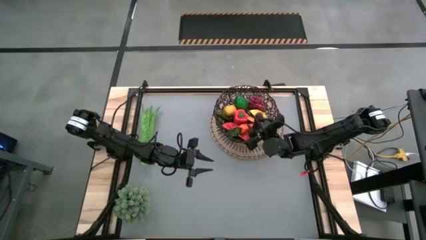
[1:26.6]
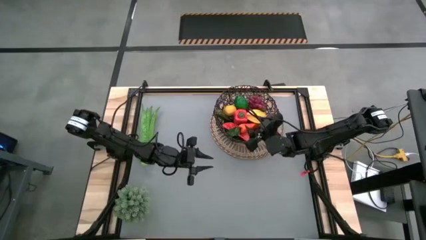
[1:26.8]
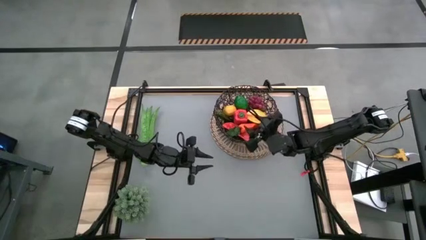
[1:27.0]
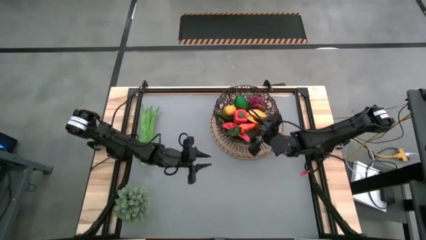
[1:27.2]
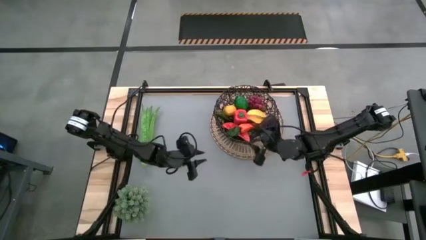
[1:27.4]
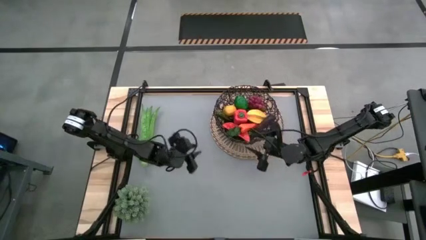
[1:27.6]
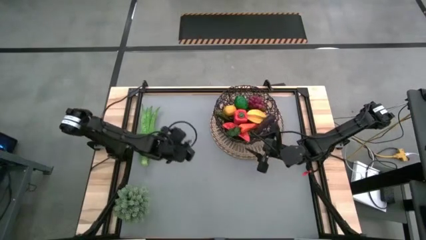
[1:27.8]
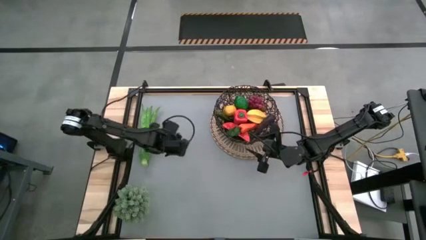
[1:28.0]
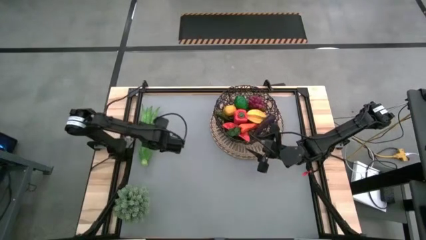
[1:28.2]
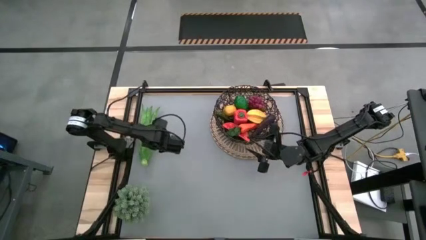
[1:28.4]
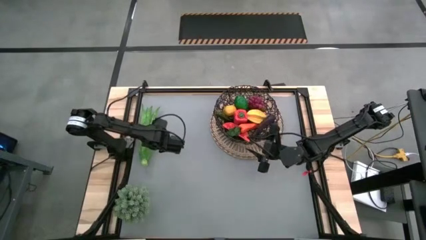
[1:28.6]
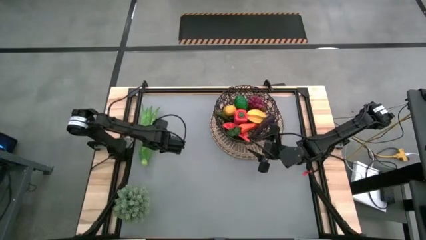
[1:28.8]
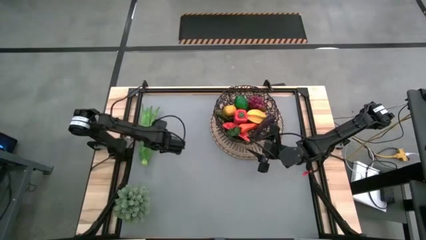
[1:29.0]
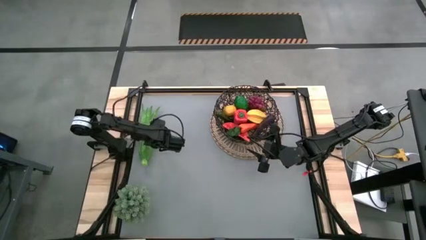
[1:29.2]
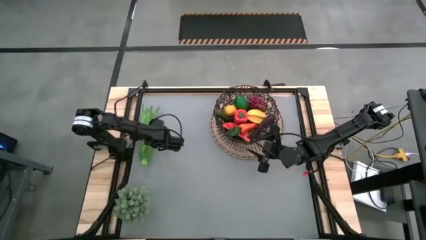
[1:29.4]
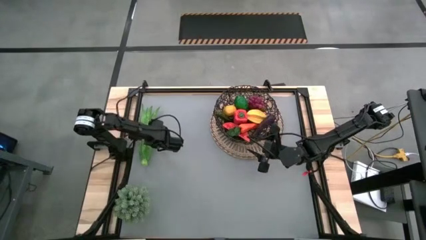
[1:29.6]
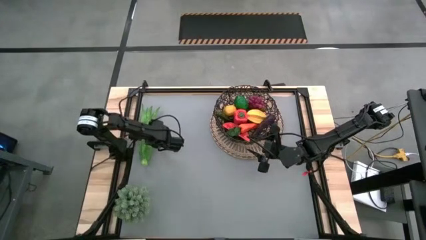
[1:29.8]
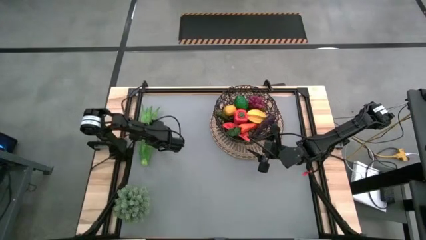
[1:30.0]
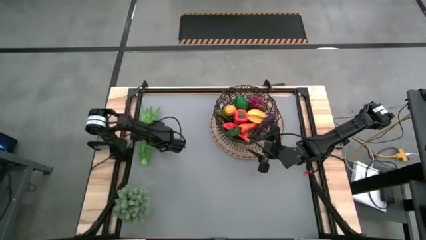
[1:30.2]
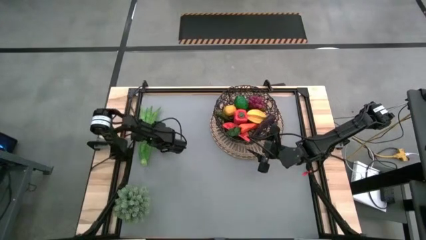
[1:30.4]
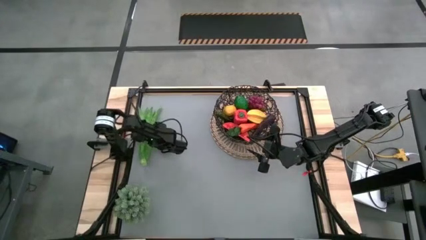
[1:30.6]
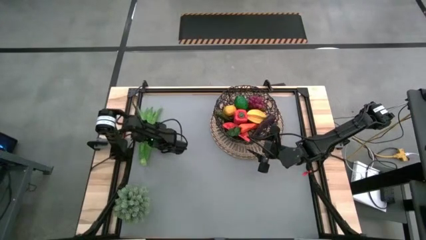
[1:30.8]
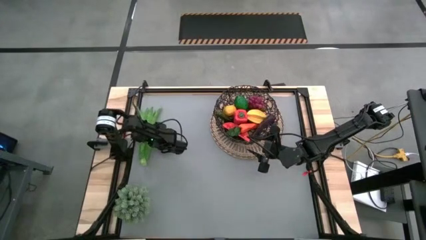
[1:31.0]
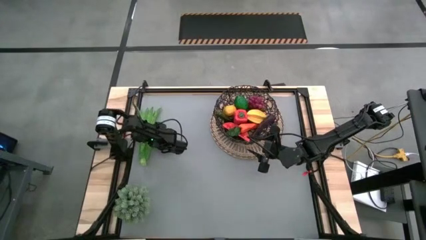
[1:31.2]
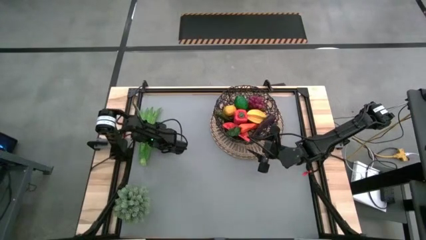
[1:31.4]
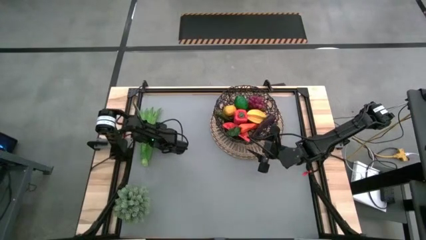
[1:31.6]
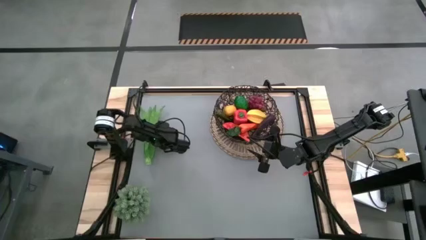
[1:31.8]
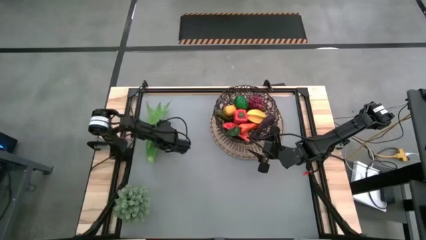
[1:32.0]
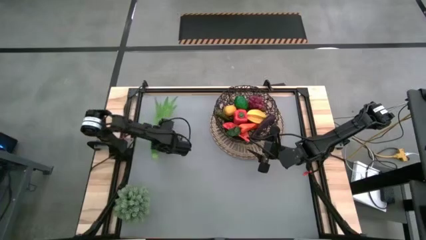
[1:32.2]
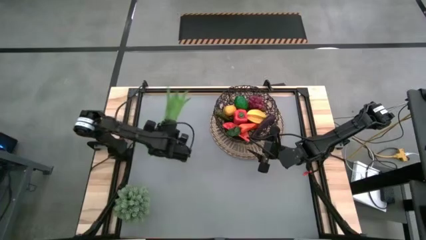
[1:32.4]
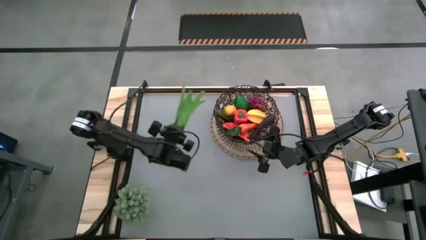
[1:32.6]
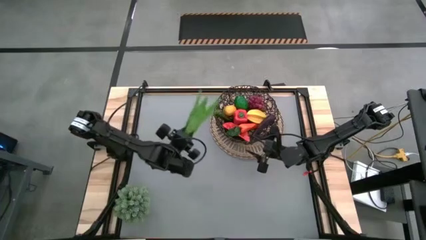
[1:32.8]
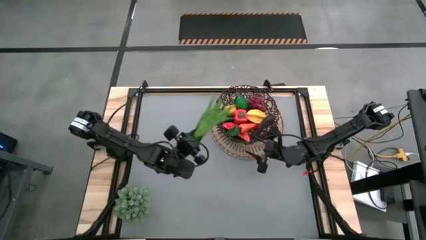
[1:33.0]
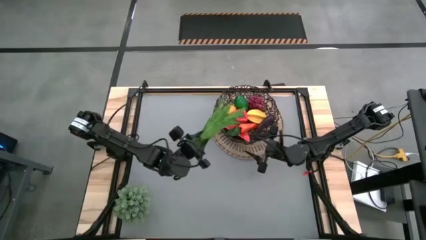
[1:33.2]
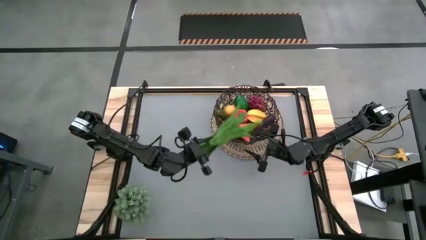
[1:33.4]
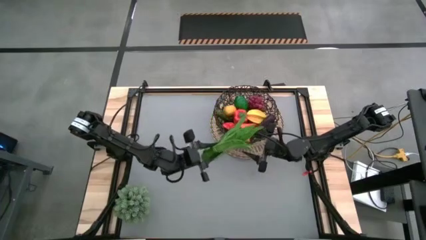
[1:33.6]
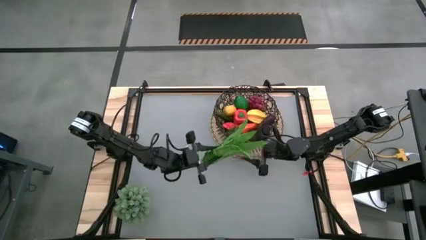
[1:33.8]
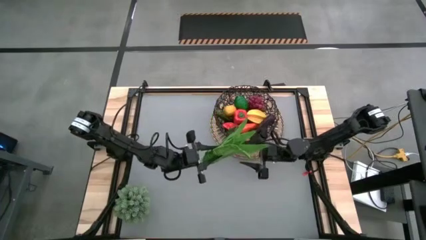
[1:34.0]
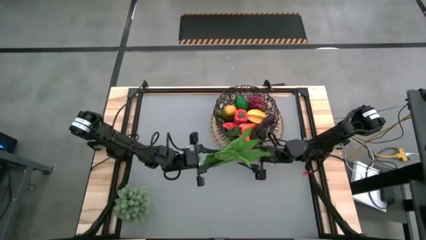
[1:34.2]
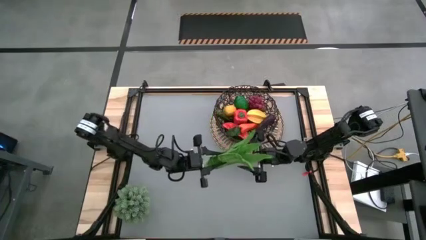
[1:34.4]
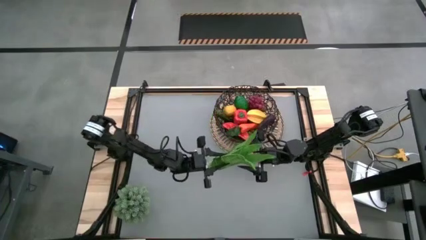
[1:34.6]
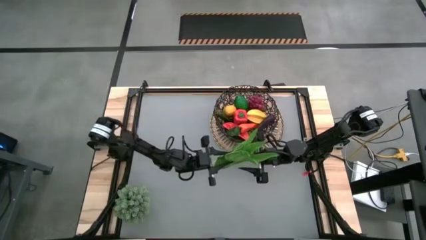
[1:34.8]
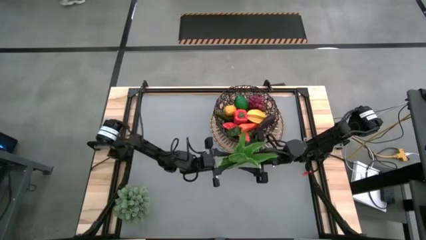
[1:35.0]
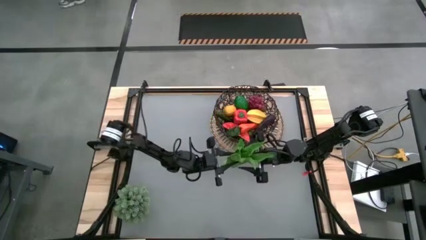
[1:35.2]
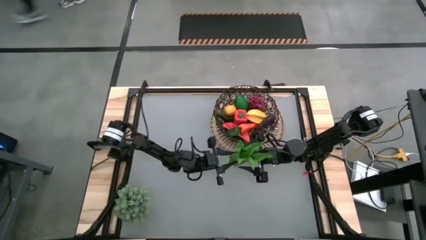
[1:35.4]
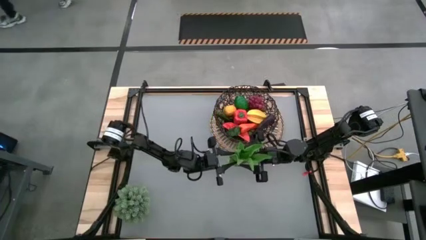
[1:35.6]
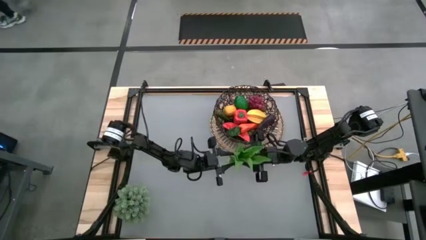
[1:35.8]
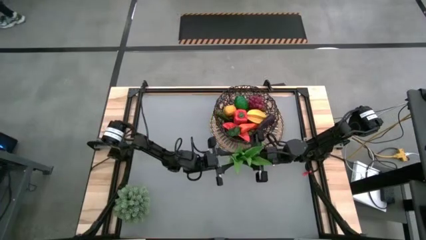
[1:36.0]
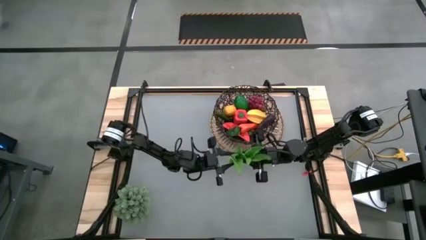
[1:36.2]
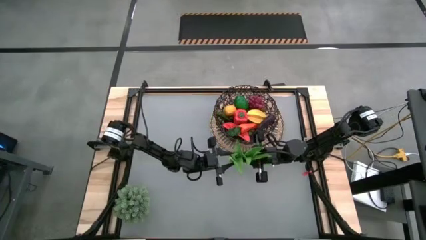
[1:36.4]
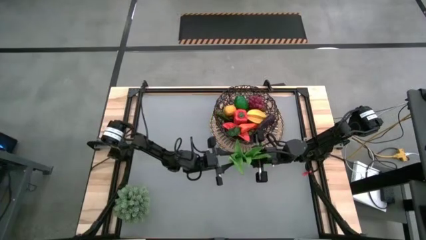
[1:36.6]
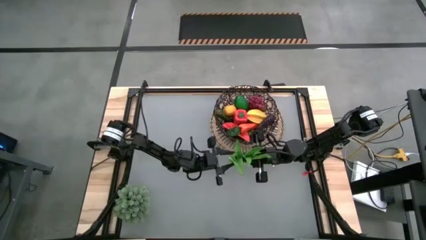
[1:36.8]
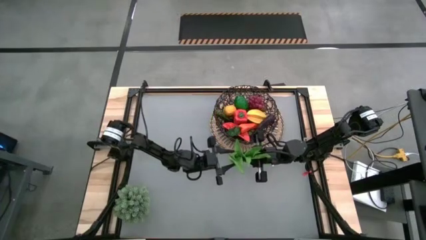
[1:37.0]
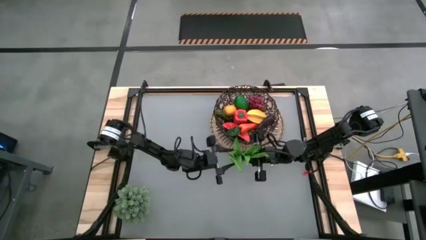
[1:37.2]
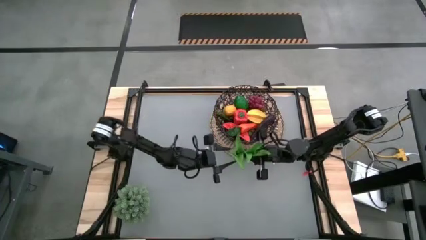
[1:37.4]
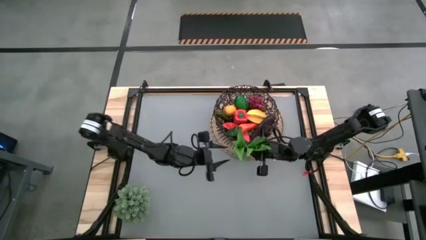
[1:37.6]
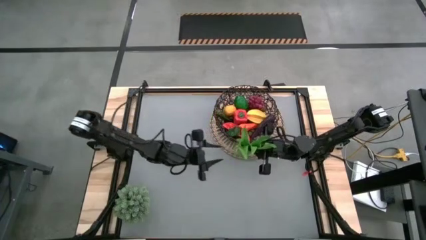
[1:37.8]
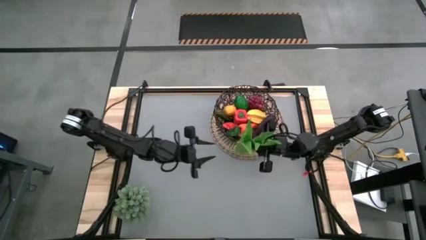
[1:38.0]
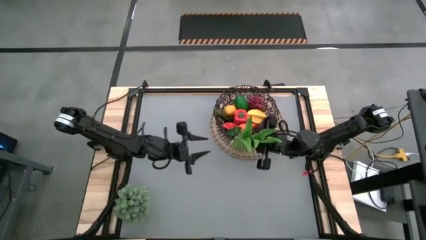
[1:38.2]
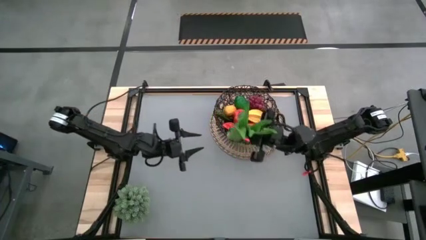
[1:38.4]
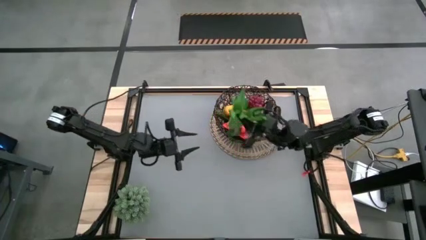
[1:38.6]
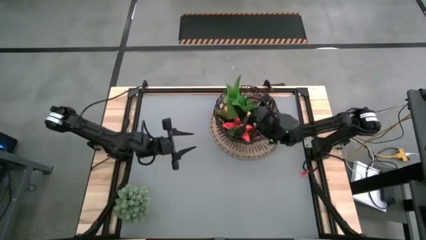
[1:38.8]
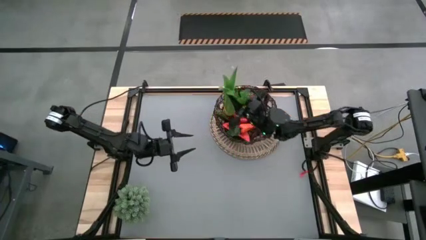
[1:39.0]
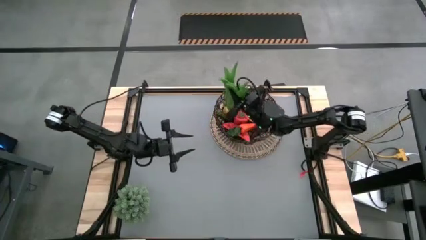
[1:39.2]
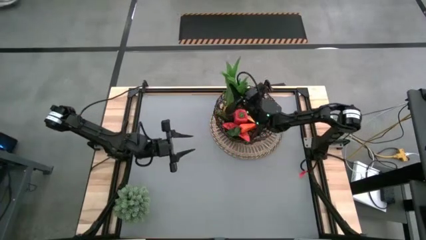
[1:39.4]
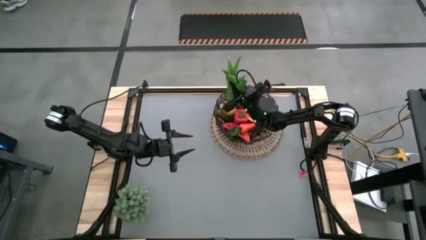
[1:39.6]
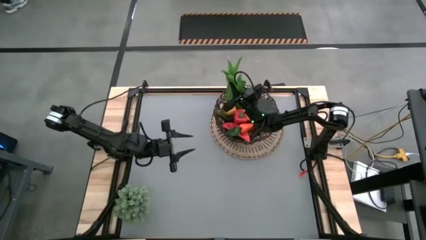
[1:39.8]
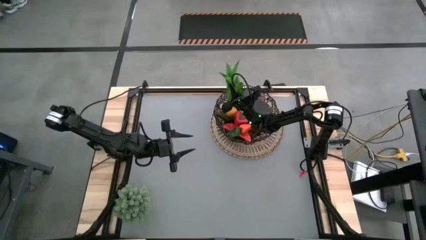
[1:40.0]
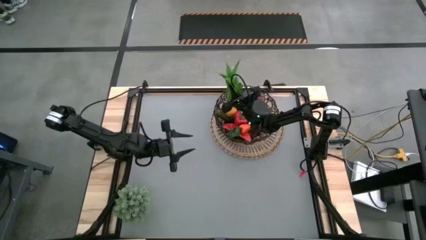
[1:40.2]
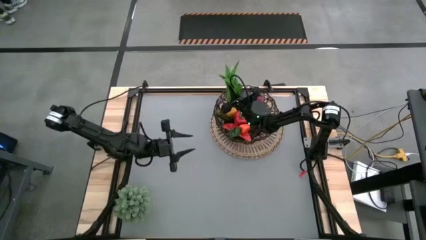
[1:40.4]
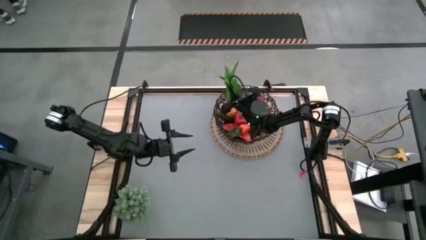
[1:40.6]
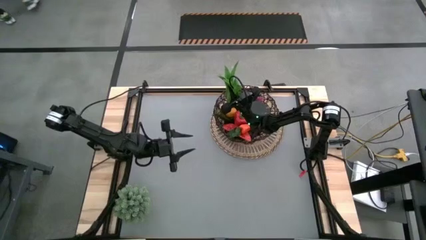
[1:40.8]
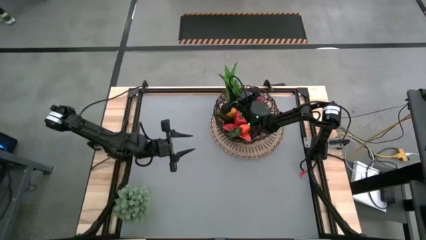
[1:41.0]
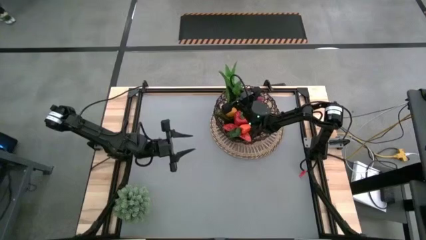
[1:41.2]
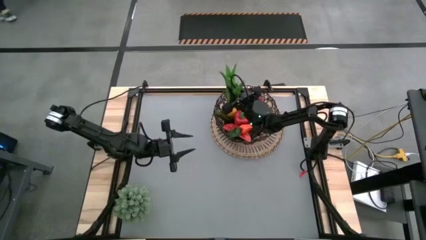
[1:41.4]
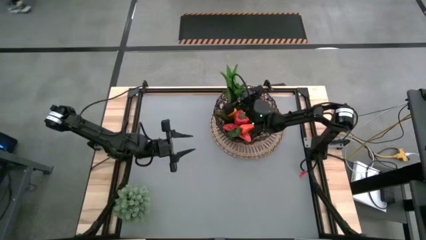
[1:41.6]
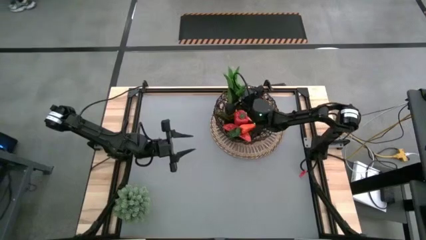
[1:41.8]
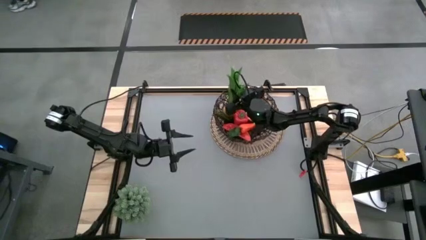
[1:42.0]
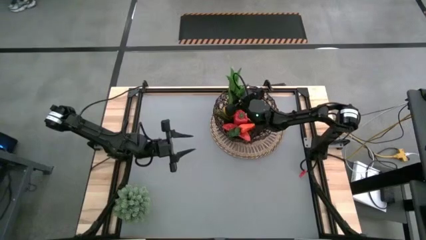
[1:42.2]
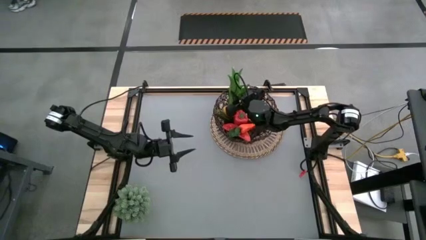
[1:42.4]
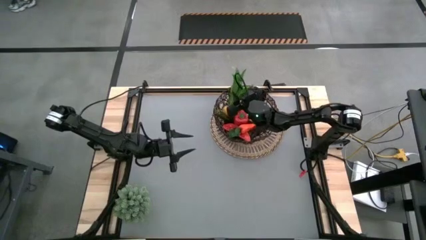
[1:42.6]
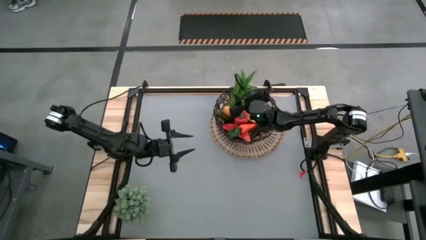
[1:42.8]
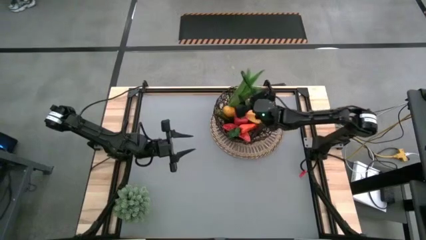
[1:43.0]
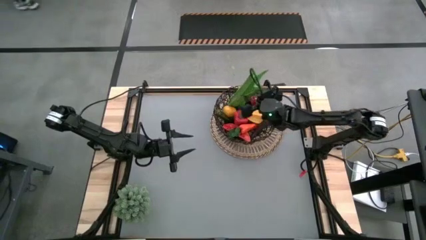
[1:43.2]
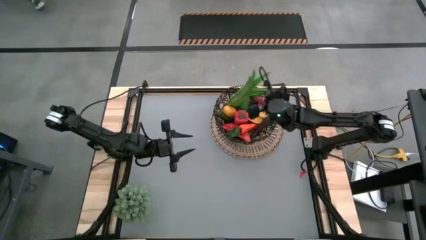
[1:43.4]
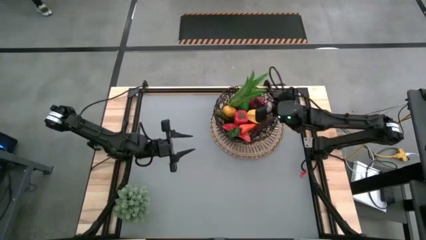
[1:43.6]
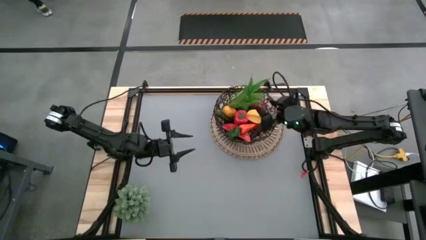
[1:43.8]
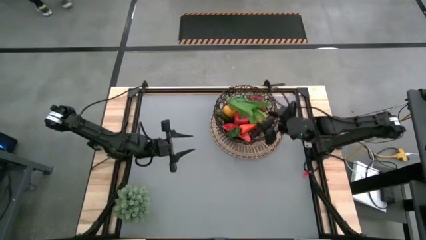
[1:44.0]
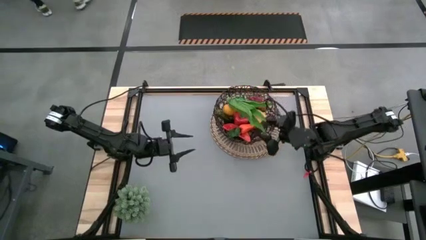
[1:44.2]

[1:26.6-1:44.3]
Task: Build produce basket
Put the green lettuce into the basket
